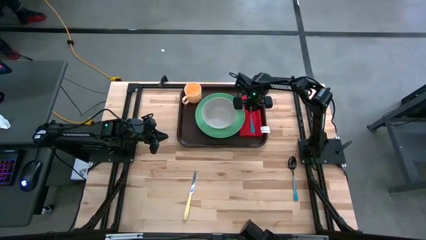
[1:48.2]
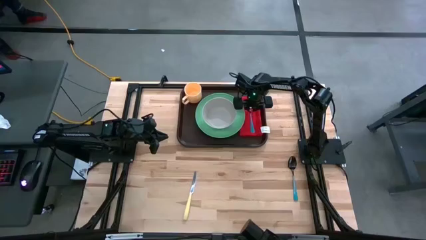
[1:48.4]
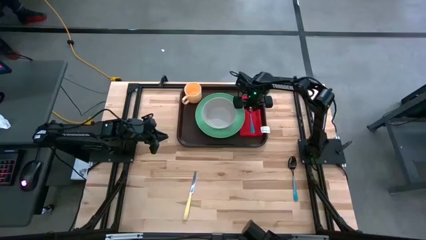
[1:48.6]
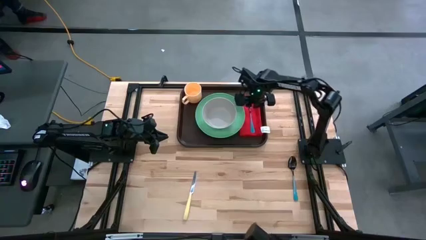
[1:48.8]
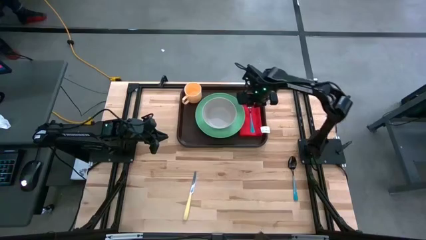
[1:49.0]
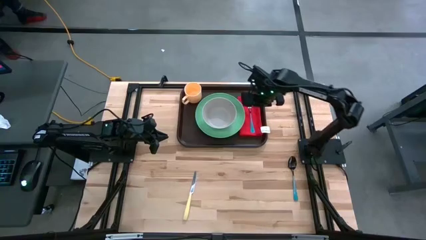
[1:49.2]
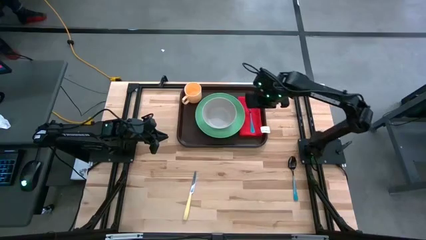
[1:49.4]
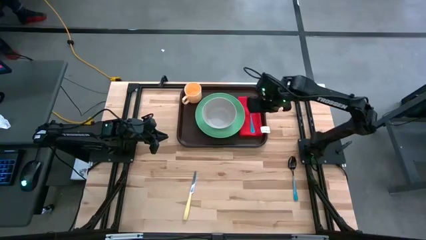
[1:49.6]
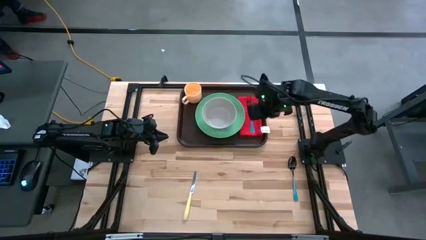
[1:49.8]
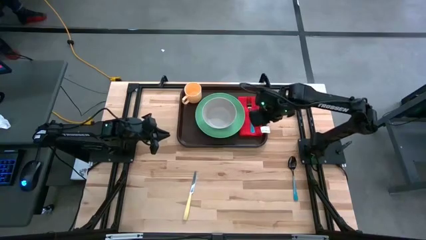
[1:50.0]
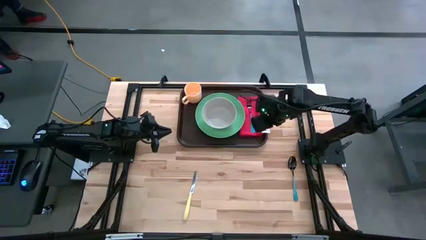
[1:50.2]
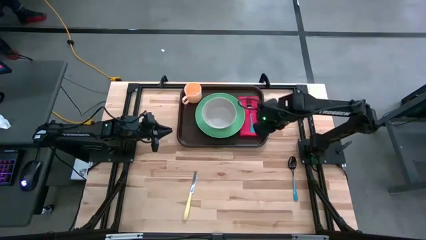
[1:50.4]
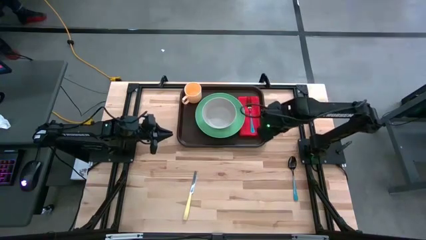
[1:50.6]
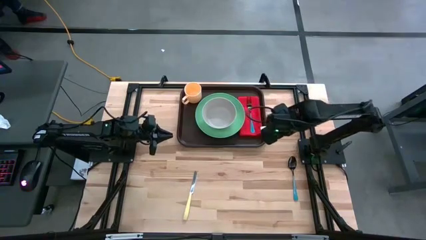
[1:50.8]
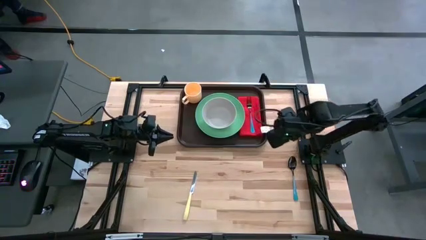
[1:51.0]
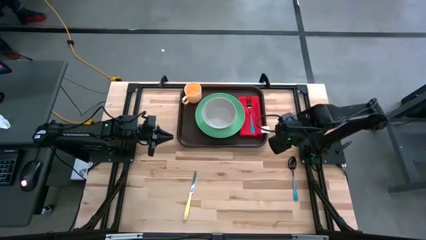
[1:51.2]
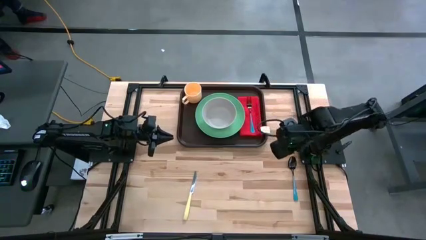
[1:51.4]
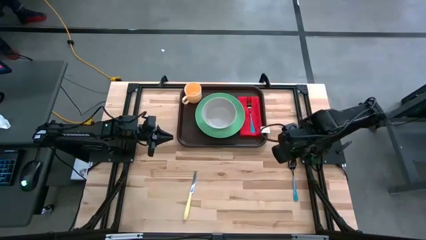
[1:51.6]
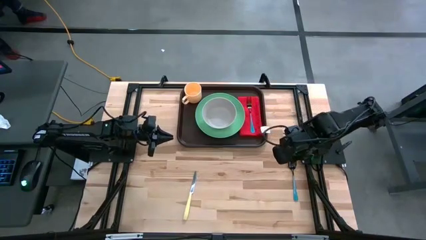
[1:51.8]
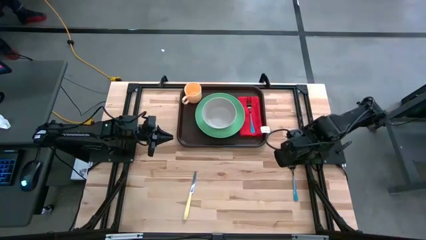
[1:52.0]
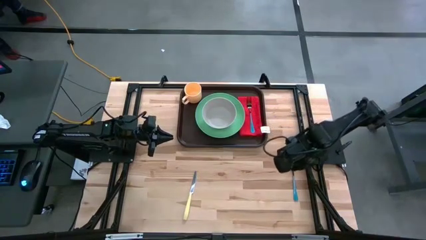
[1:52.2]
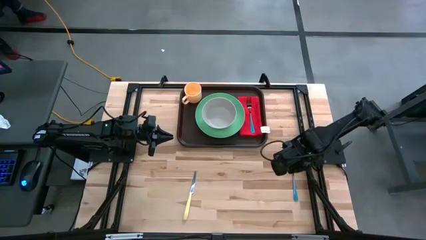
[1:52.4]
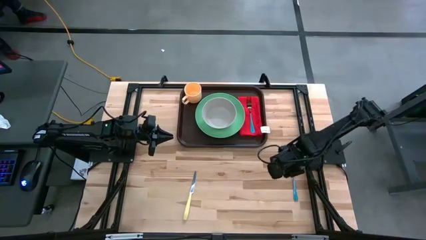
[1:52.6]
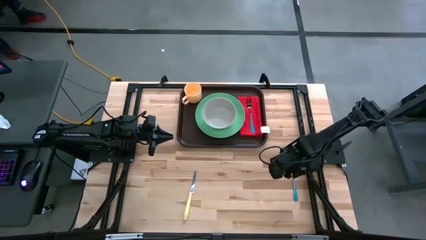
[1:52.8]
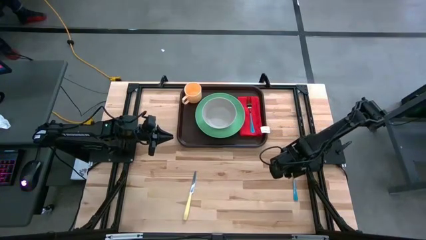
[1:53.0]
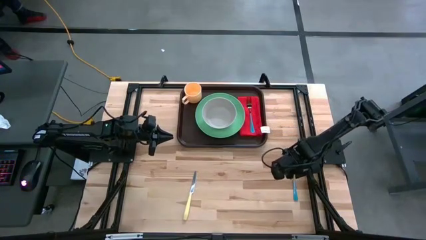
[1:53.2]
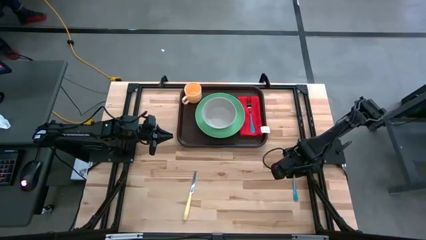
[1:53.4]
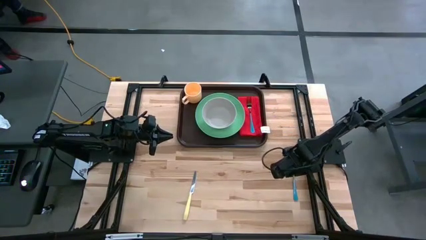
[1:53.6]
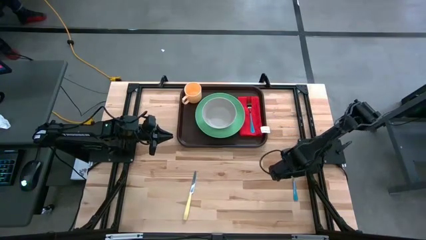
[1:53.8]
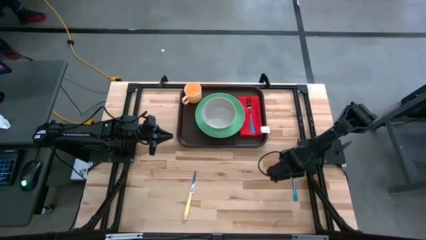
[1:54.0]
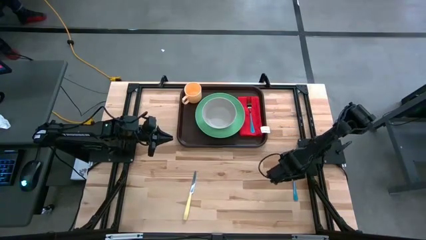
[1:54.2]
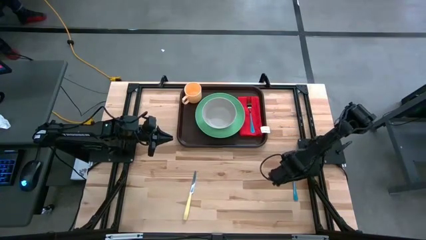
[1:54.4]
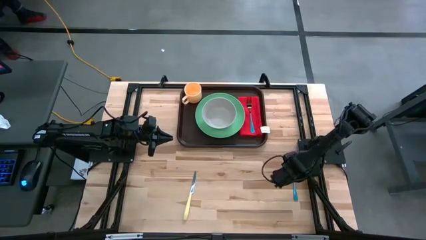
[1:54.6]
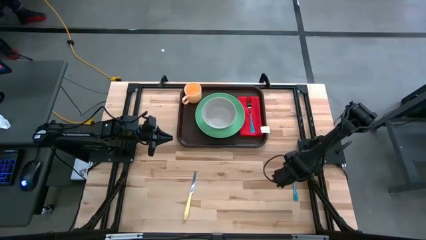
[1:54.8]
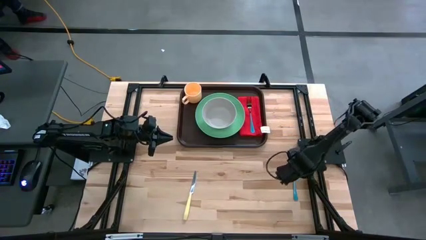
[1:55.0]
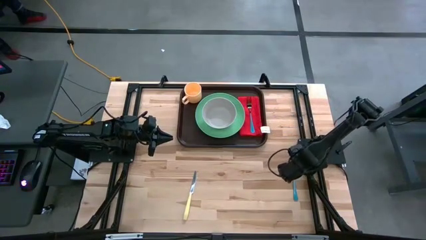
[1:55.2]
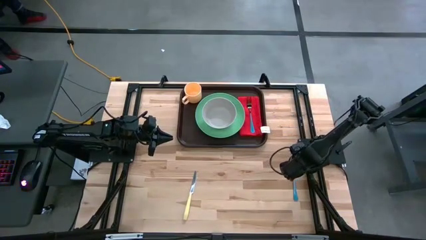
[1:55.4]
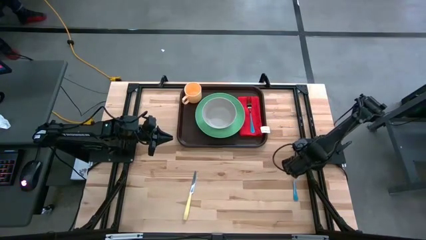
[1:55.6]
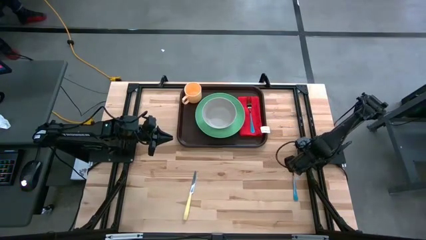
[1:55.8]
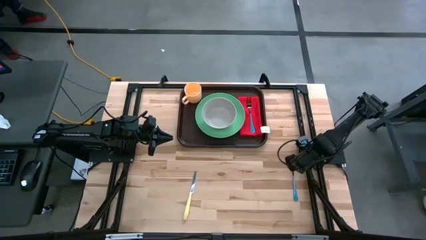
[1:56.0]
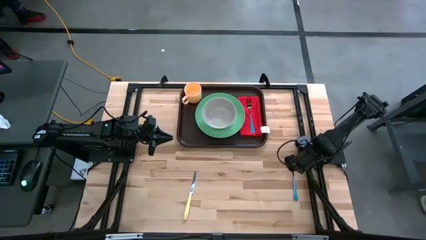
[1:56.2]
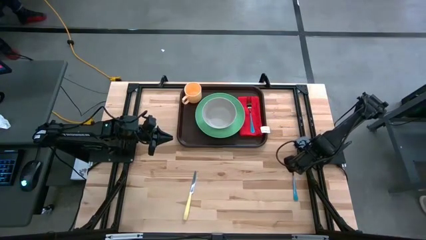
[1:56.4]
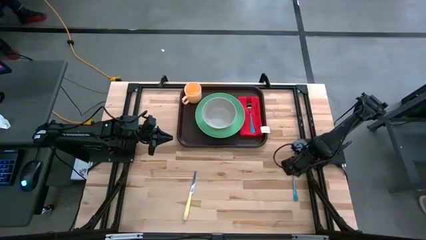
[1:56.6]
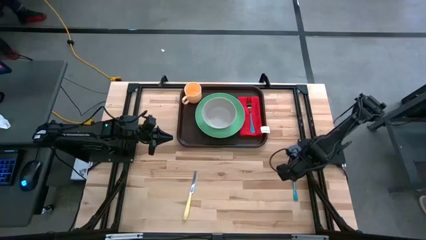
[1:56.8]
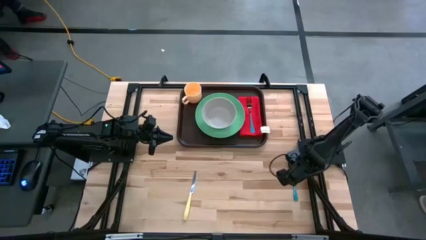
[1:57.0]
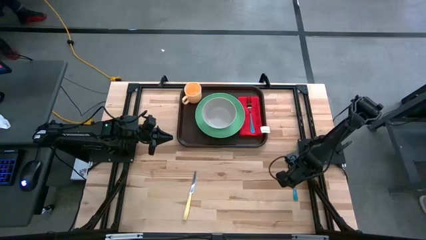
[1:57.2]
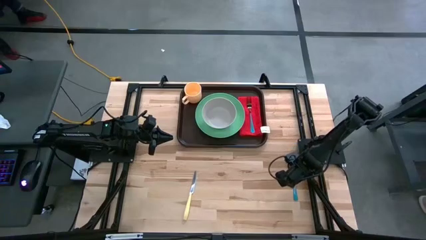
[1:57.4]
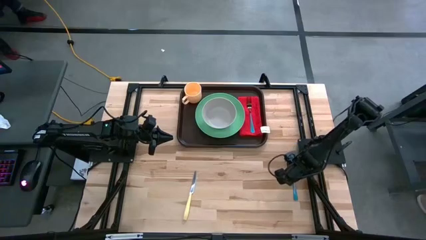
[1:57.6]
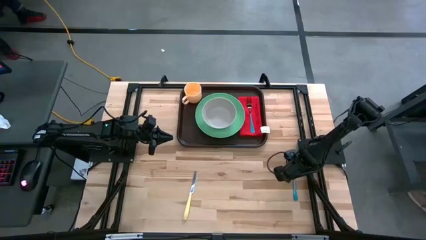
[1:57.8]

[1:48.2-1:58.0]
Task: Set up tray
Put the blue spoon on top of the red napkin to the left of the blue fork

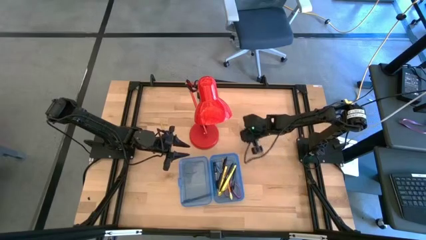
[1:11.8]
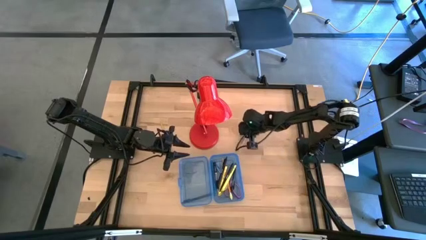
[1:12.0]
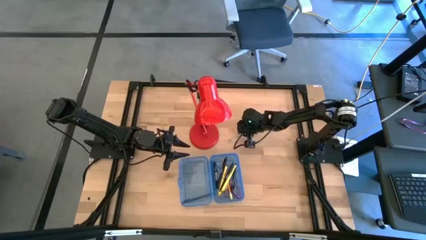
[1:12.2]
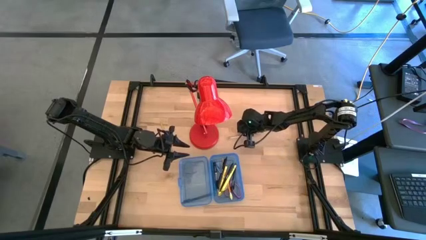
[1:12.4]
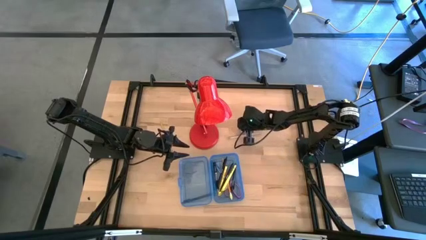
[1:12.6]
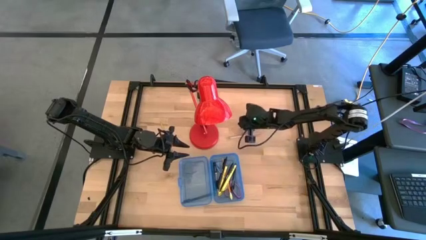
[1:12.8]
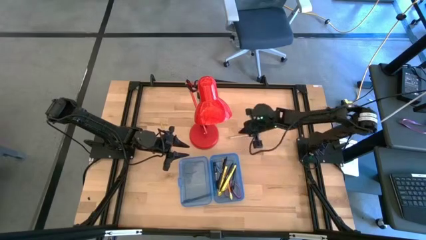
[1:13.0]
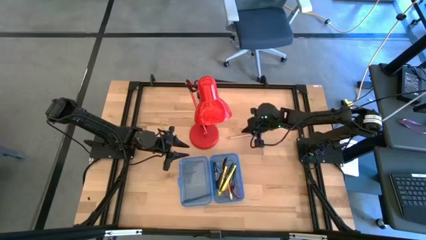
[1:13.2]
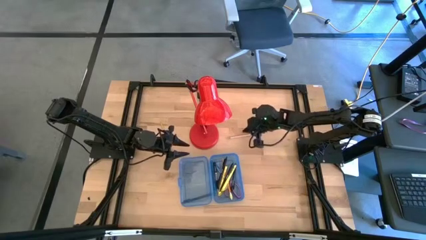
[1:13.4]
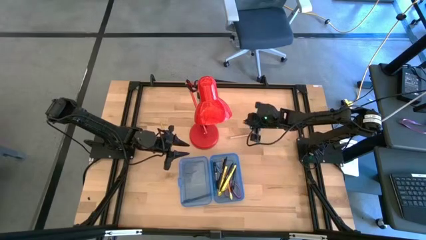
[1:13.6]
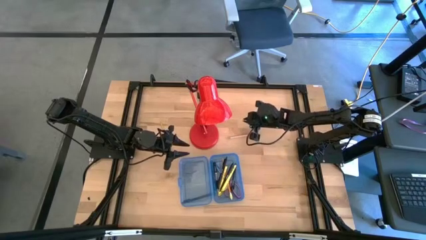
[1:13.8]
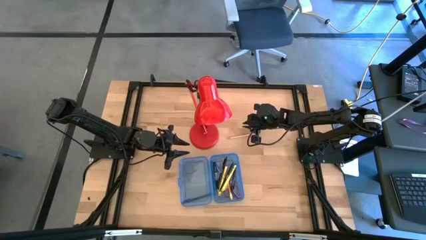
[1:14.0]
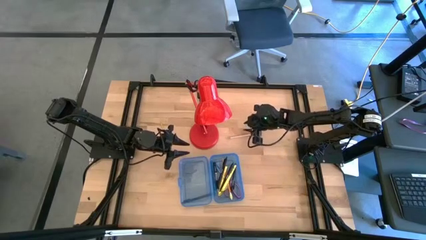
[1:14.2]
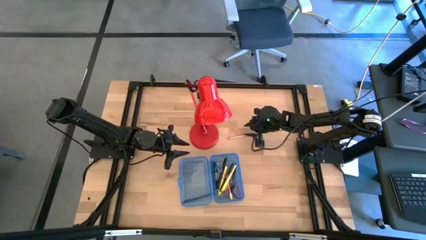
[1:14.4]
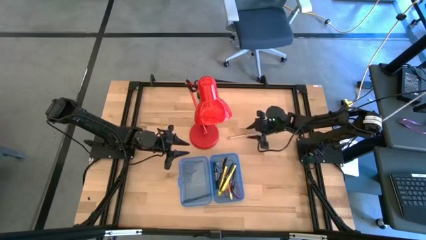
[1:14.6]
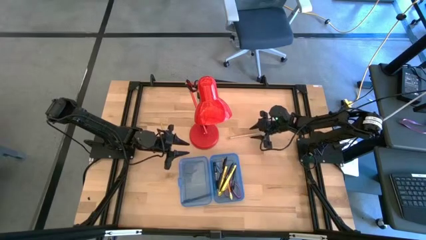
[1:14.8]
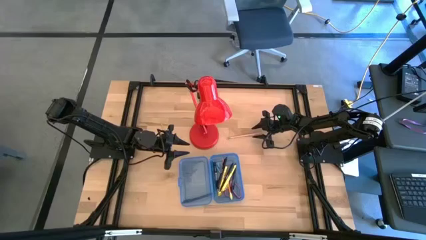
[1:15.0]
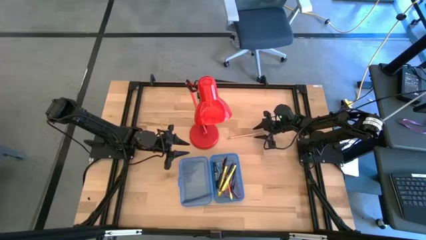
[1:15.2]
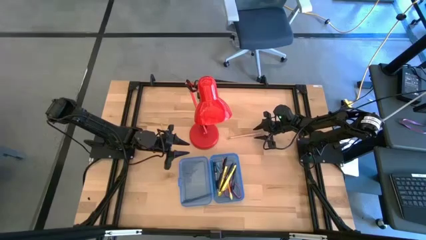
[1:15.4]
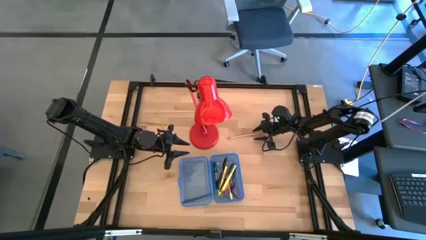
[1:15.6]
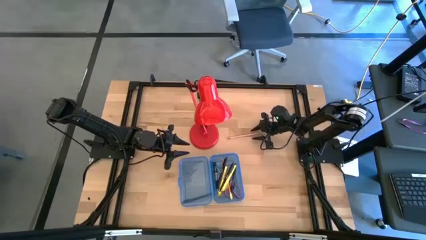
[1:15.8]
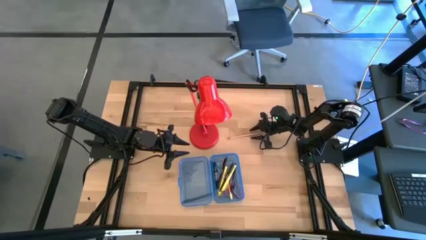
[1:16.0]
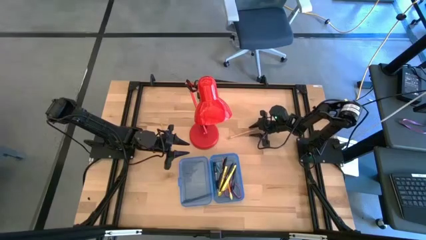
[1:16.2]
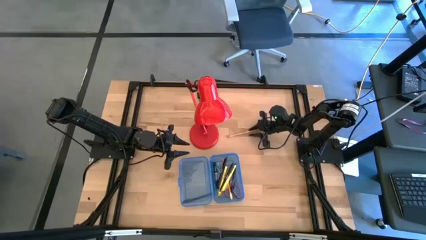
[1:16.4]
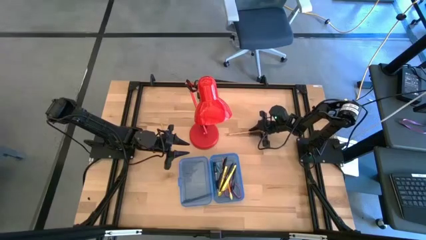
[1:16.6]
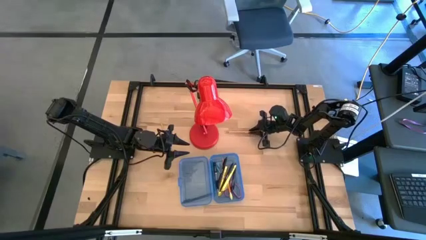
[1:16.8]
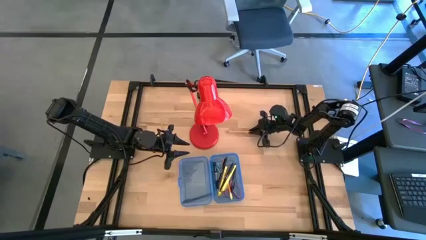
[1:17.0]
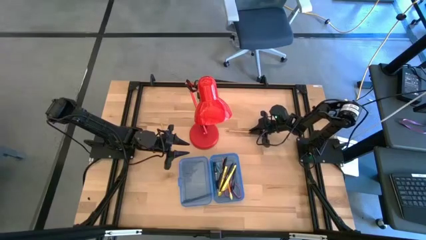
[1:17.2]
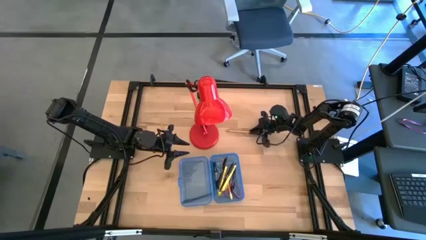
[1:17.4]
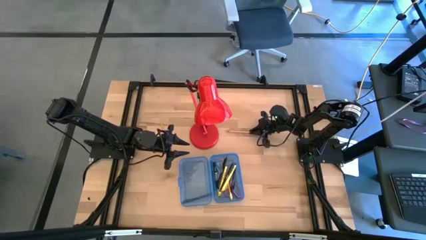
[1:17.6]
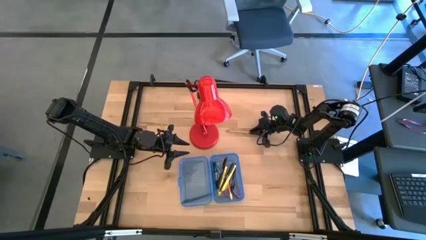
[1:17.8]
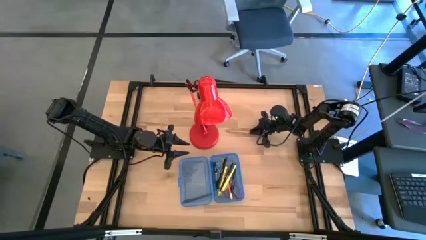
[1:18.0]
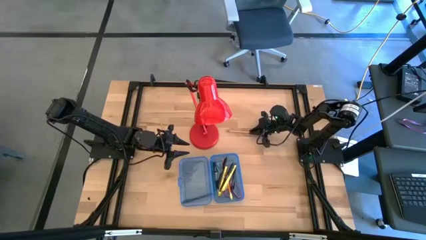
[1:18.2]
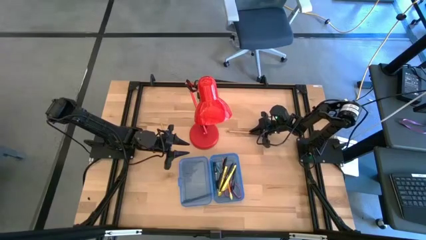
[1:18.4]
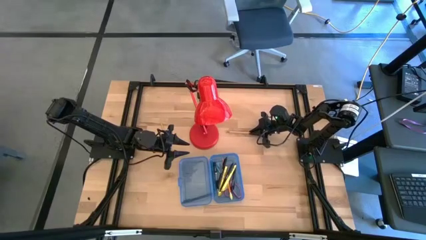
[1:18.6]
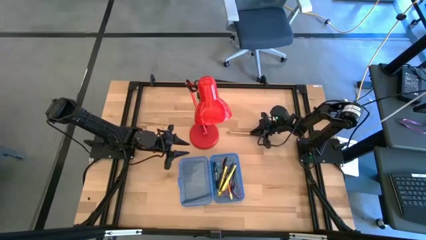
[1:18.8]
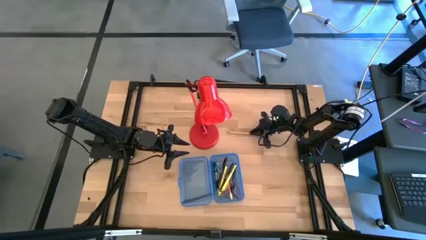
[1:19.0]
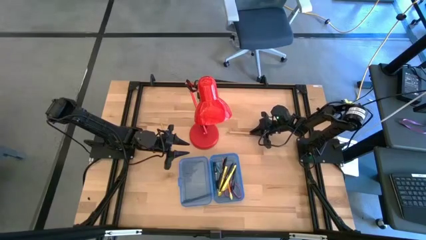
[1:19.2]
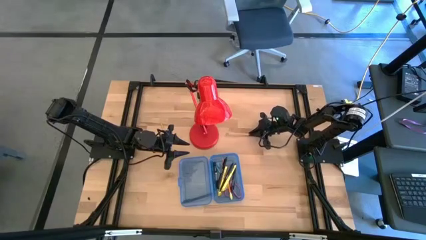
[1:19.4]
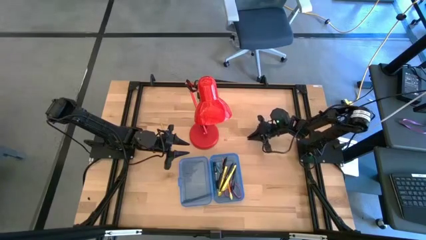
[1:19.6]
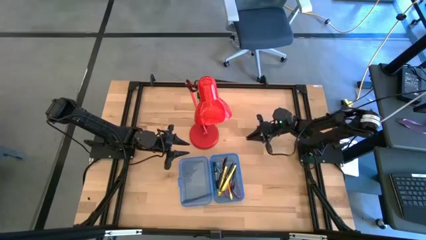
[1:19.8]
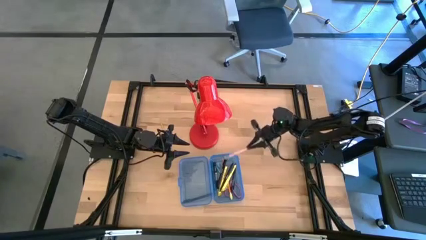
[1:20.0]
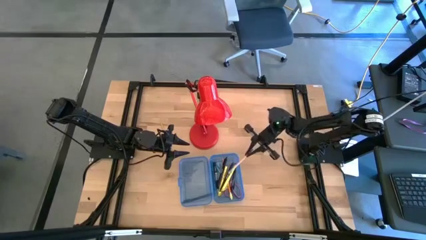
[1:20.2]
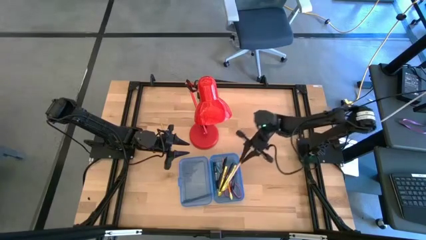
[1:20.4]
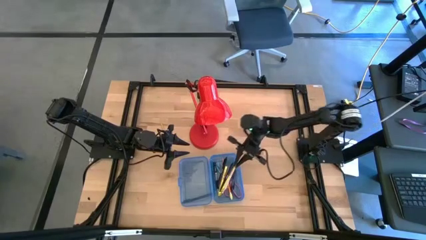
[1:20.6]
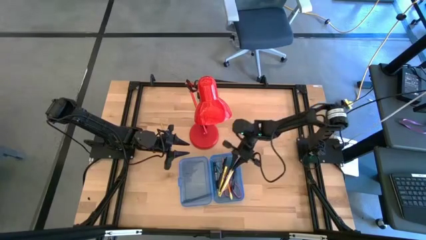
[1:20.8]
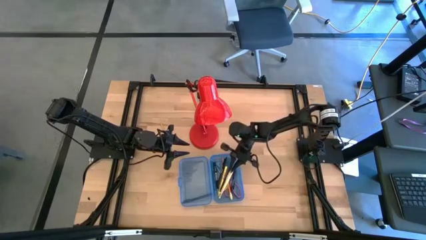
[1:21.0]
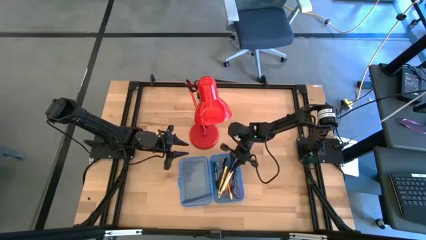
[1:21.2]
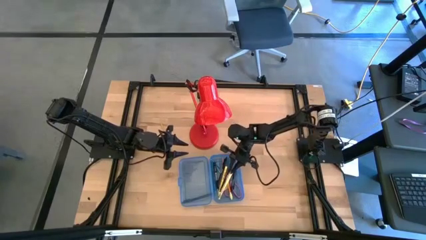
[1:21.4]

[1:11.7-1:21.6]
Task: Pick & place school supplies into a supply box
Put the pink pencil into the blue supply box
